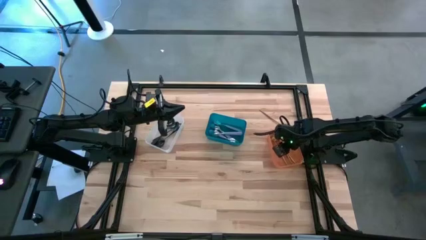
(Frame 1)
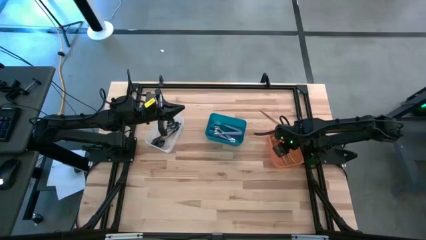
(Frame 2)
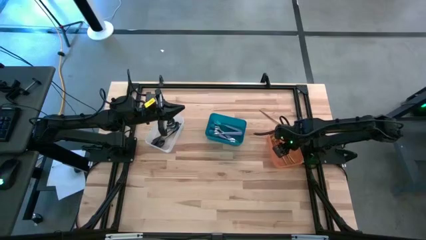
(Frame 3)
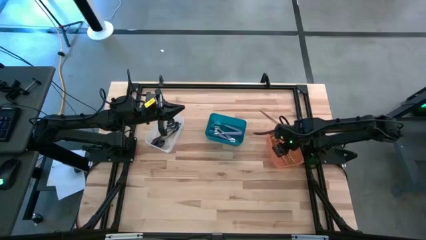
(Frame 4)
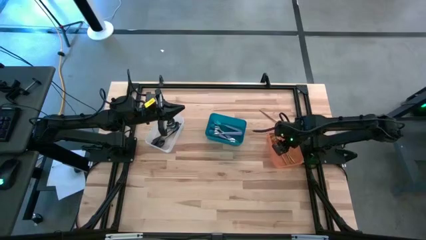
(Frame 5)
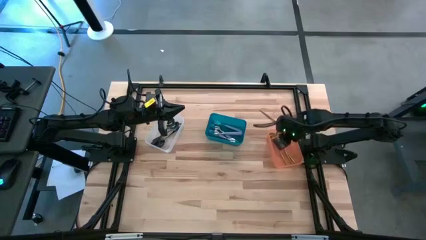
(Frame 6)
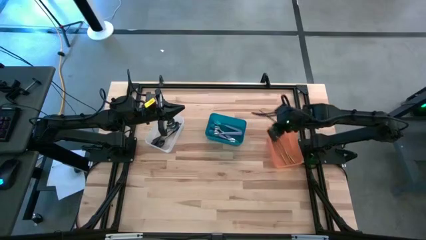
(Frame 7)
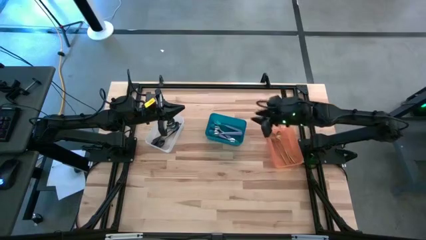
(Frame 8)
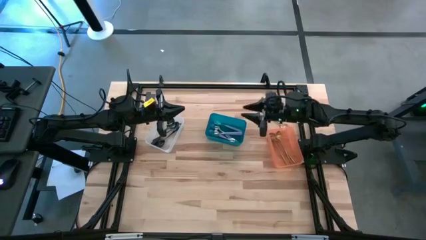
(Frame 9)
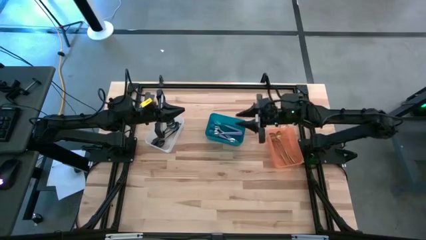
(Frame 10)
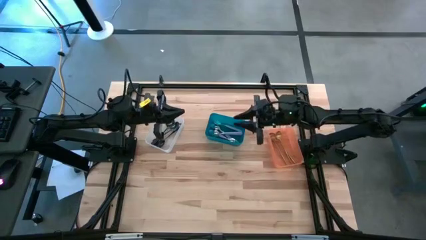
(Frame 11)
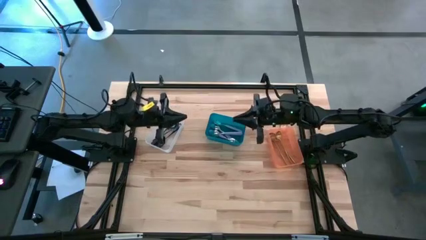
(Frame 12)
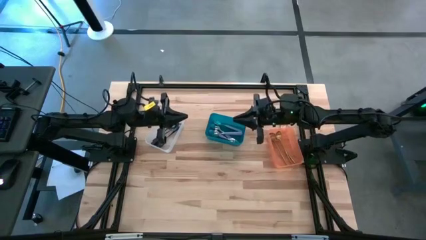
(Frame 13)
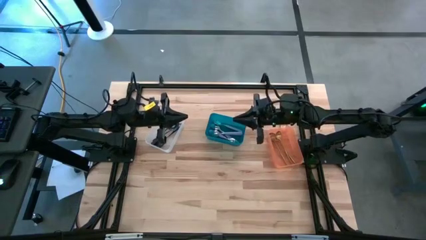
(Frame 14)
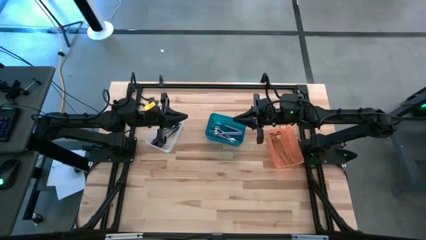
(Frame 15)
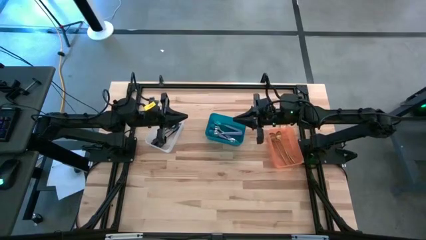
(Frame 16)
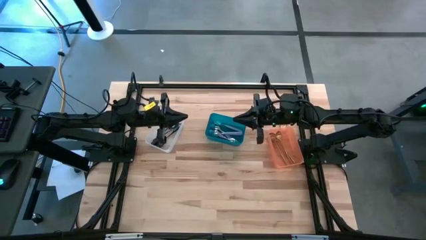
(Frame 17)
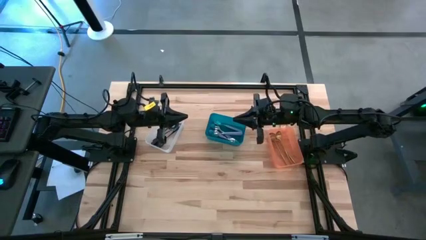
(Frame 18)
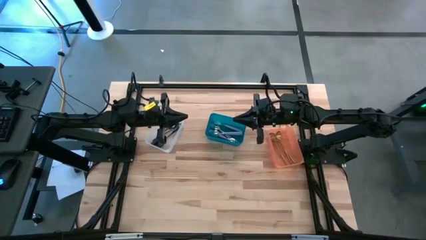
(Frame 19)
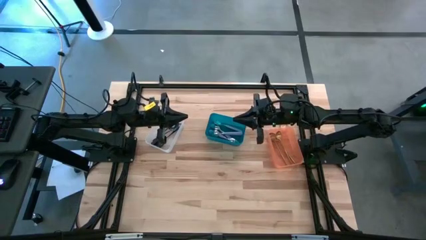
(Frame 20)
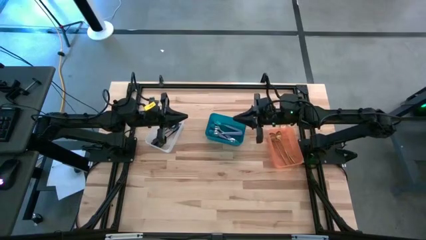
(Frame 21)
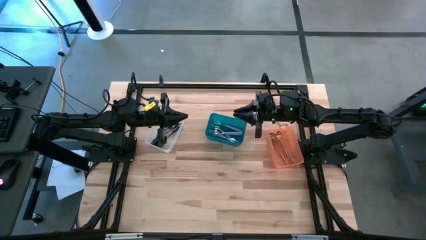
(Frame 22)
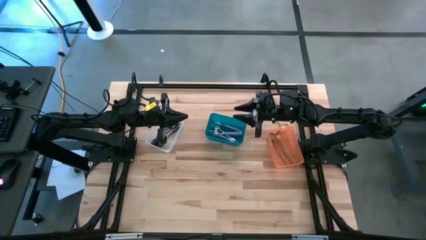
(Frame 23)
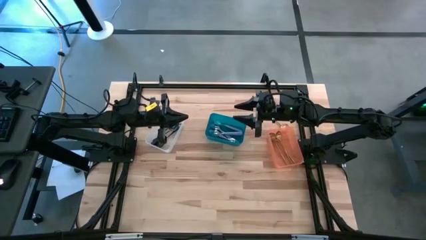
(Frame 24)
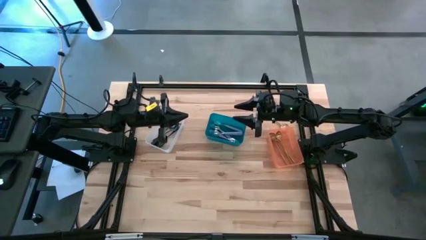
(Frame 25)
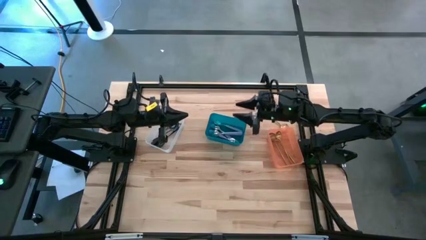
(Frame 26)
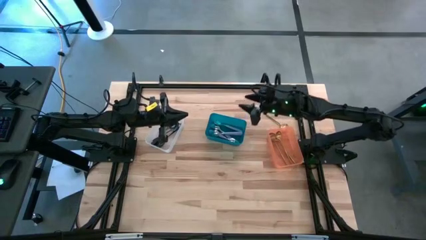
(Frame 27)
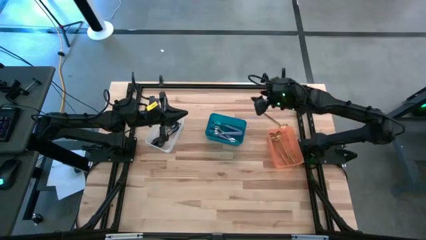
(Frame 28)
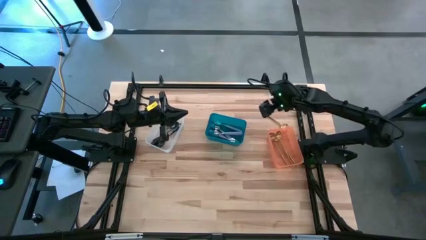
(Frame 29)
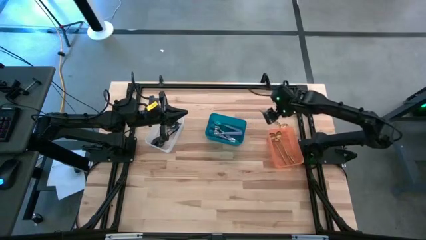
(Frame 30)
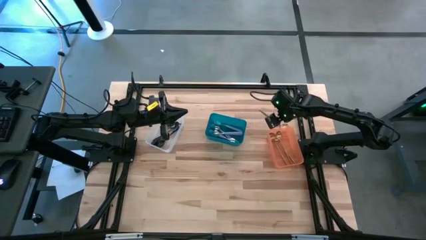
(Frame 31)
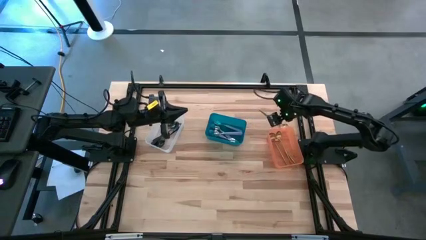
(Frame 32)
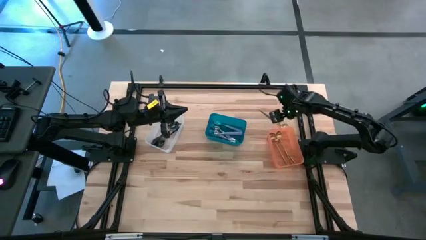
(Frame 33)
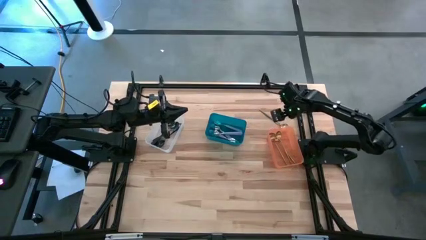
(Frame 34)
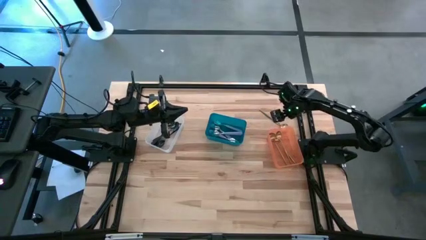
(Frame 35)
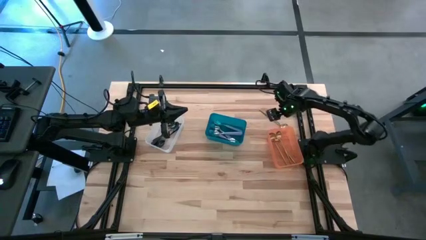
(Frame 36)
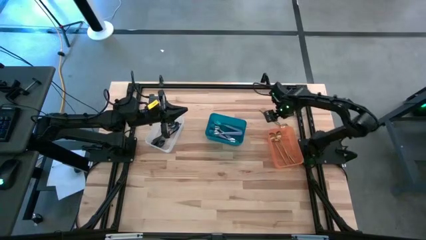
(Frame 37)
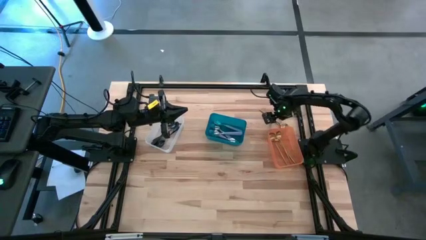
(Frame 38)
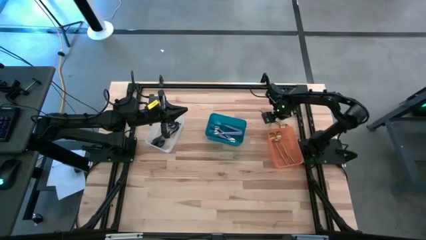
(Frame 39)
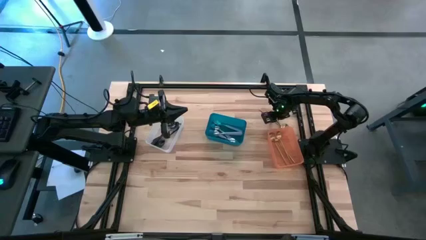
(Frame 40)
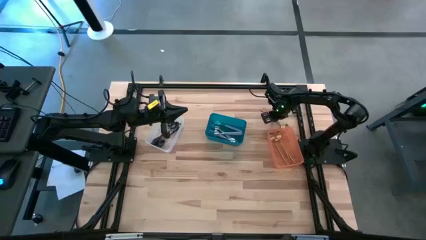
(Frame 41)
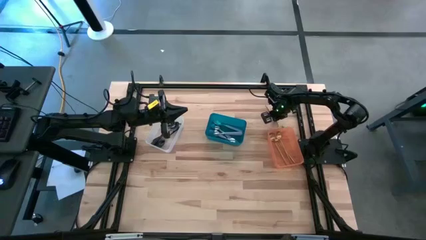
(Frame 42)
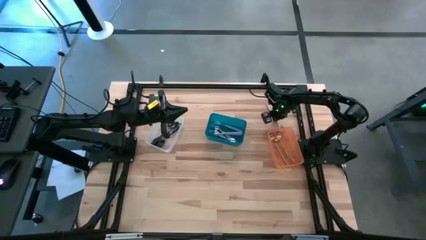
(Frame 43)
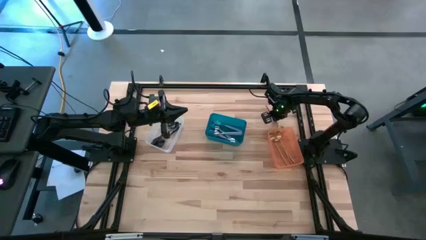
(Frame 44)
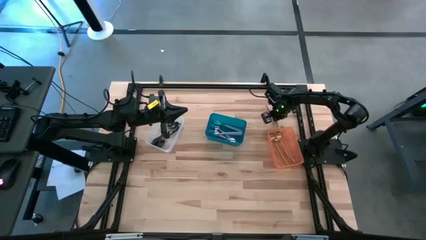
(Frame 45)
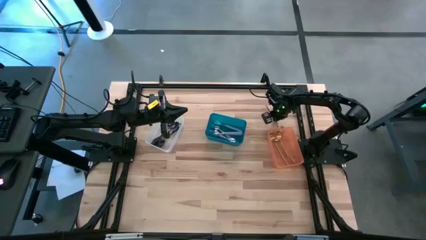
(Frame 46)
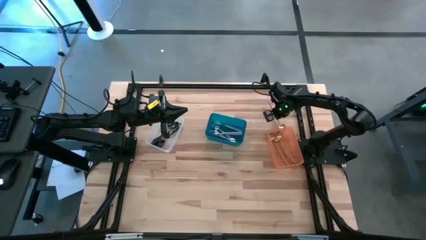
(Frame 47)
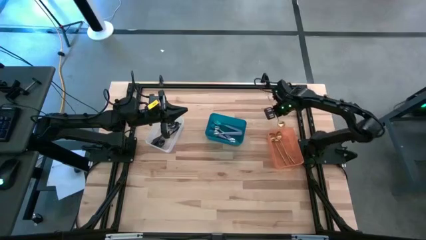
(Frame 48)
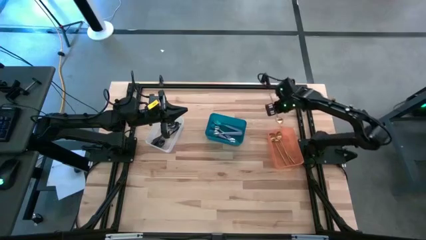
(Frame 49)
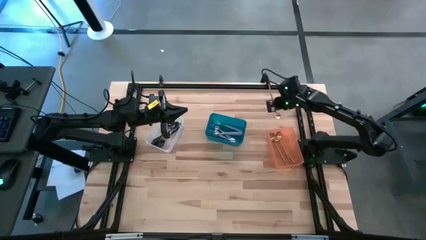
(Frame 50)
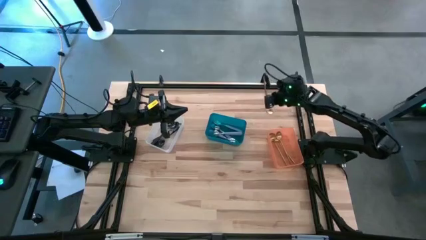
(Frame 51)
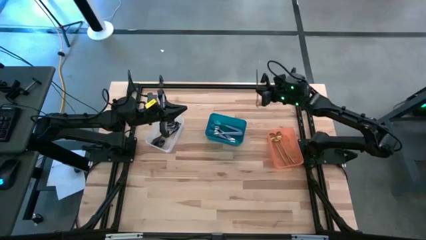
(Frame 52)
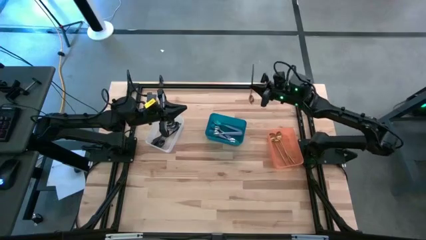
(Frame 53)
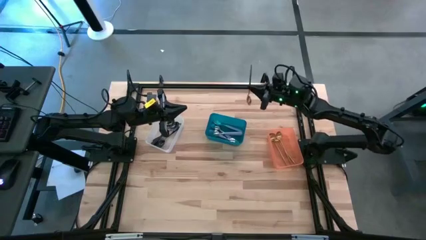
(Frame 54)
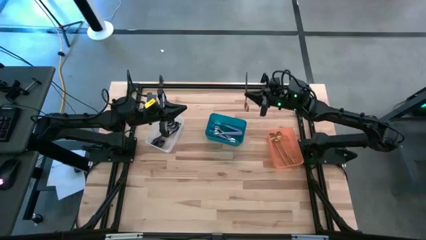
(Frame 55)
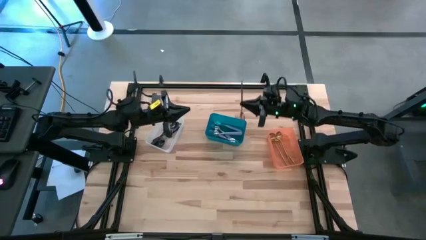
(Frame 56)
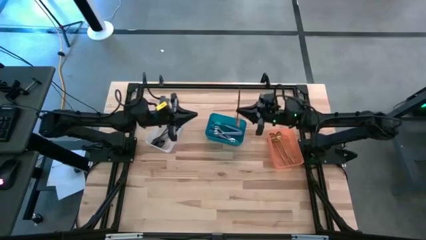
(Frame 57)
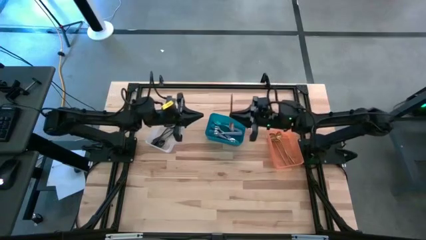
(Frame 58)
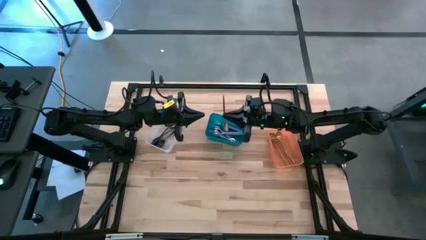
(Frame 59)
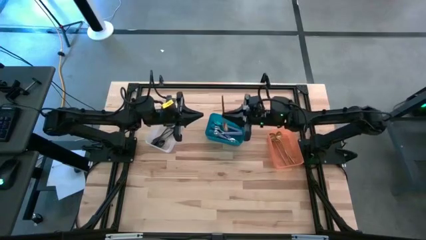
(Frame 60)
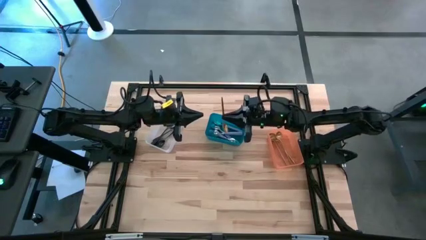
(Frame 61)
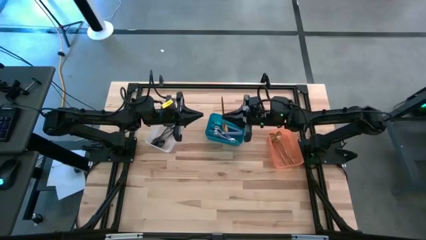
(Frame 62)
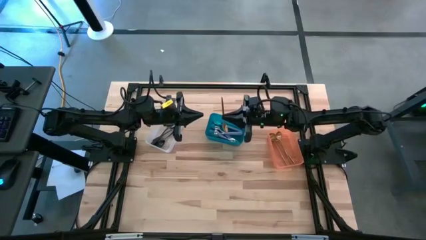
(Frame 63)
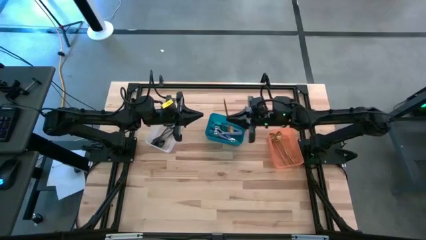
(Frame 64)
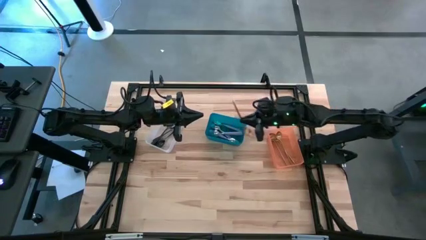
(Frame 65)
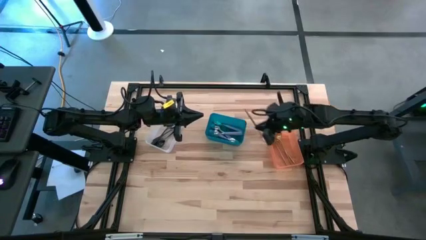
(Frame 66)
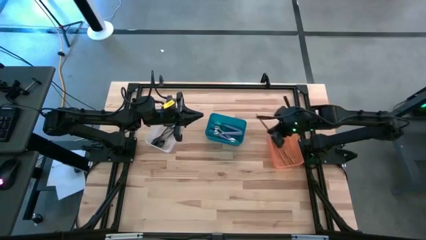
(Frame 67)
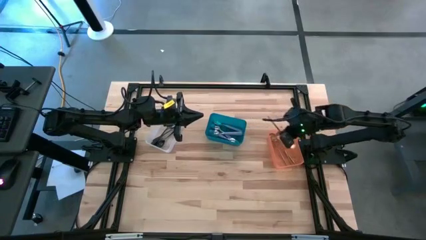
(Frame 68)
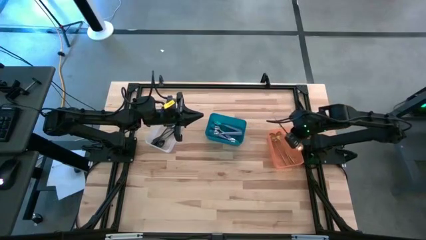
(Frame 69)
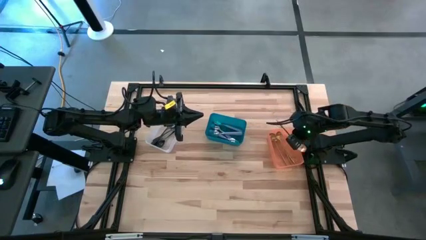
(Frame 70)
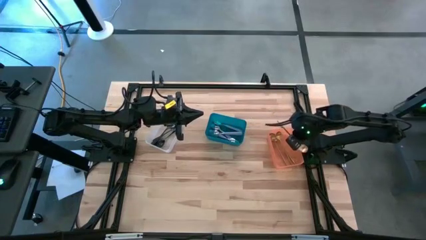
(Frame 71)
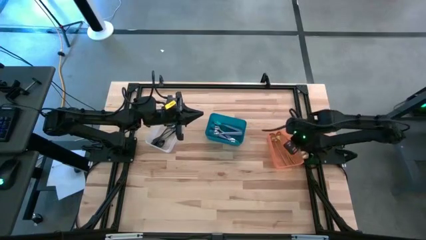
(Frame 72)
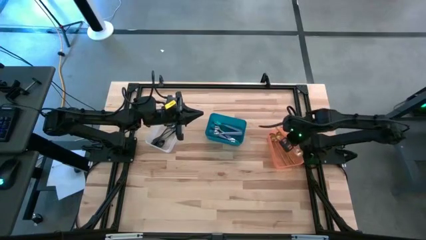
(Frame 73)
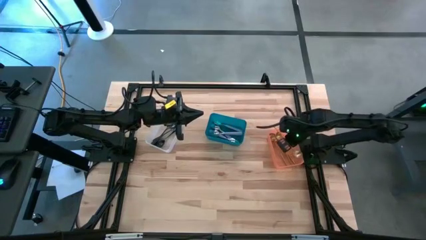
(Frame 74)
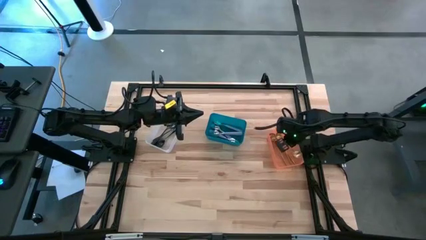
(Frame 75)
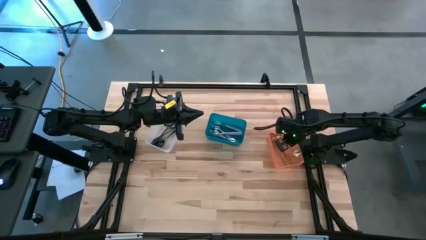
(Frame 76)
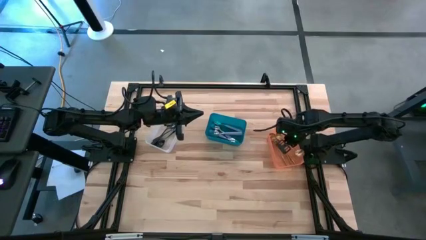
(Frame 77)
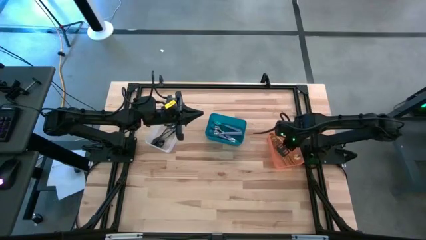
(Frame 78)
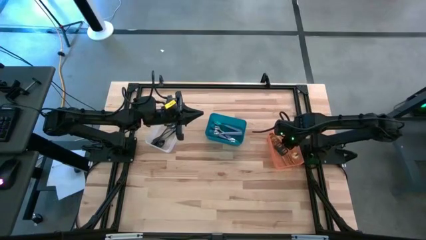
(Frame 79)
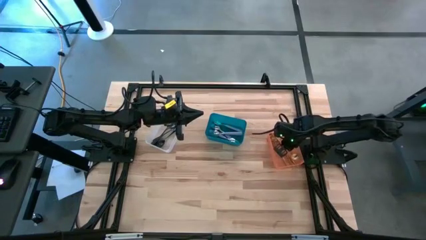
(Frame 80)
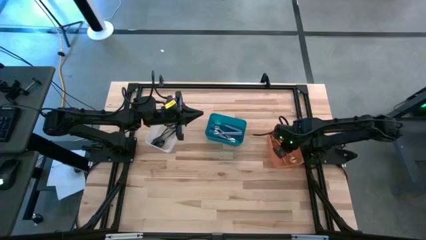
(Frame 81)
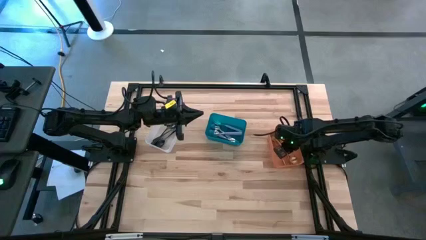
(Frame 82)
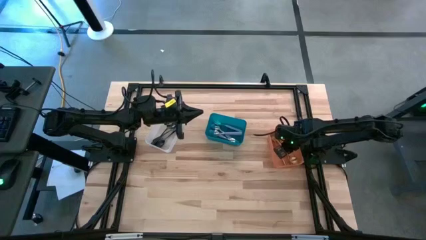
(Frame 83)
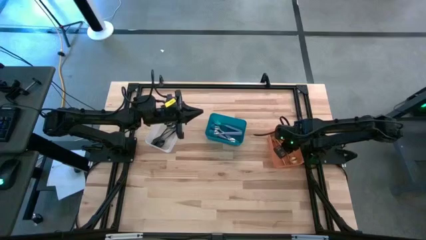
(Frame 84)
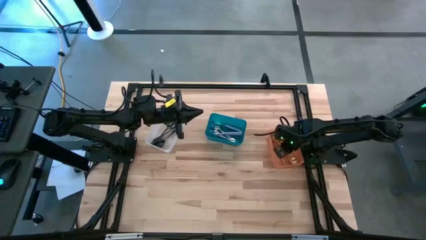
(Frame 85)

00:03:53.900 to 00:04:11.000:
Task: Sort silverware by color (type)
Put the gold spoon into the orange bin
